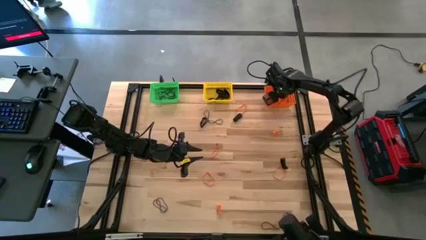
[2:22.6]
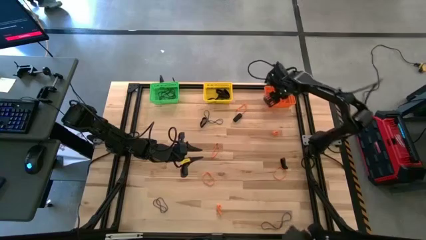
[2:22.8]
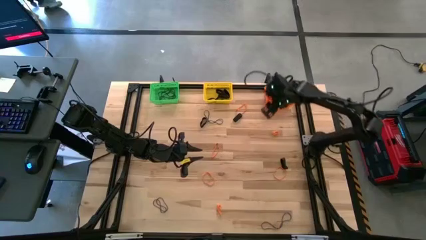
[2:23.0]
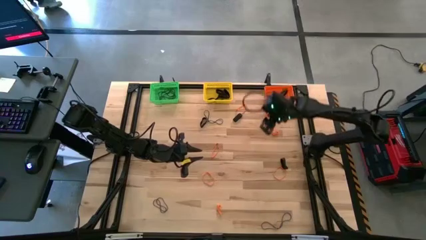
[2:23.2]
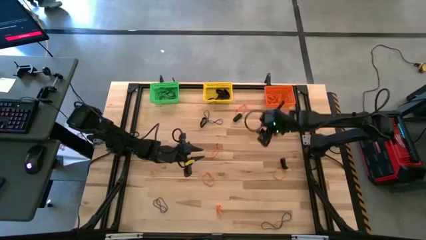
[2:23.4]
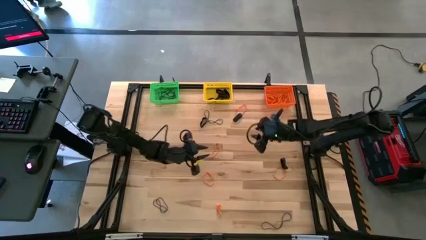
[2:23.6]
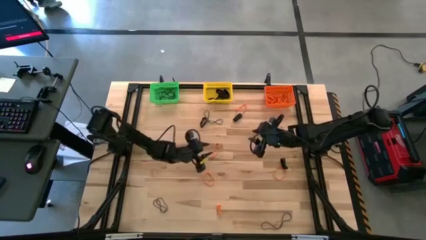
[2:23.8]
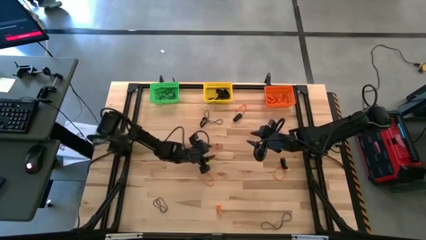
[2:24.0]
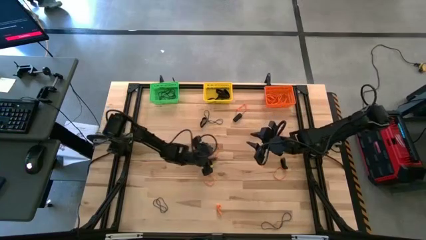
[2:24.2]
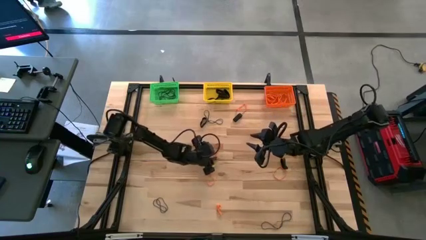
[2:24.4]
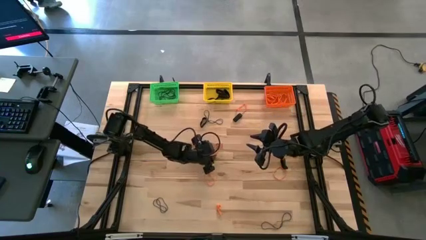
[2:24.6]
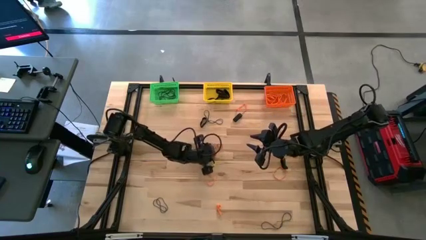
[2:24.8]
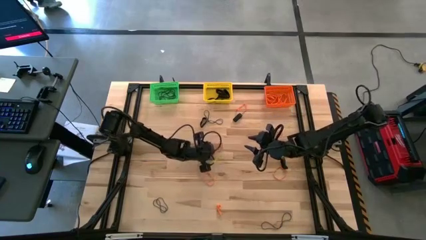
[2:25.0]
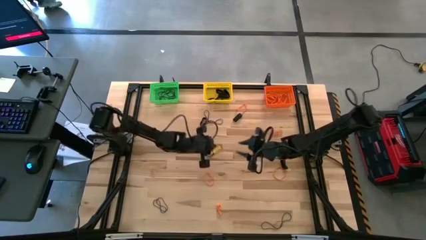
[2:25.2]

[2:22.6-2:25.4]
Task: Sort rubber bands into baskets
Put the orange rubber band into the orange bin

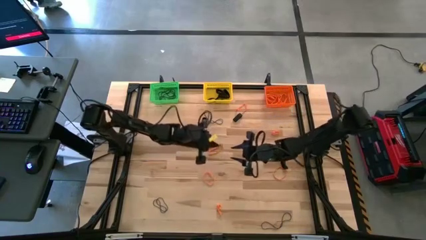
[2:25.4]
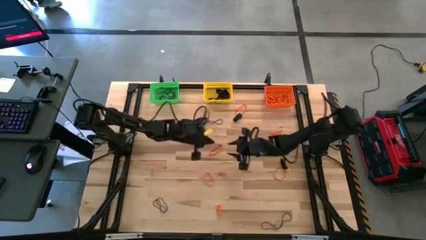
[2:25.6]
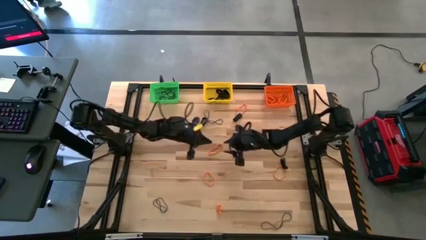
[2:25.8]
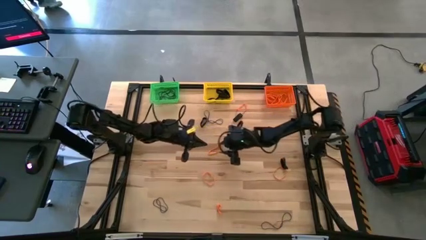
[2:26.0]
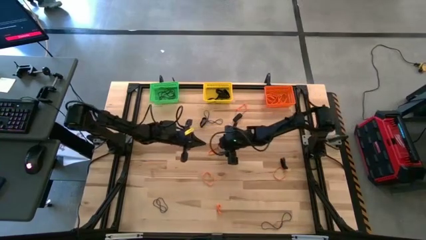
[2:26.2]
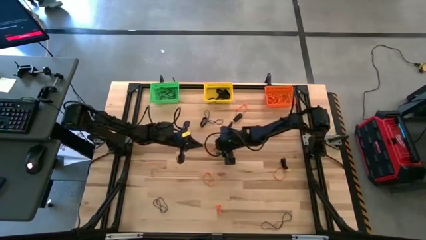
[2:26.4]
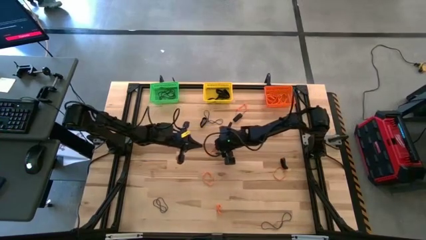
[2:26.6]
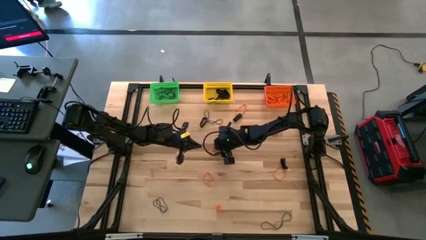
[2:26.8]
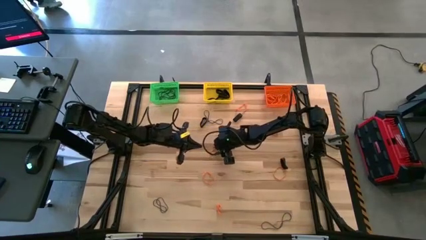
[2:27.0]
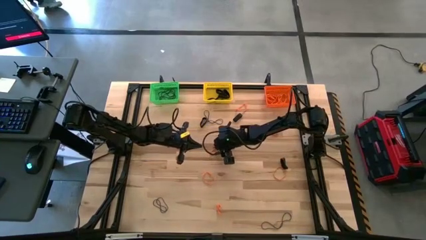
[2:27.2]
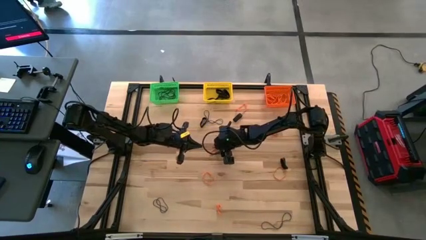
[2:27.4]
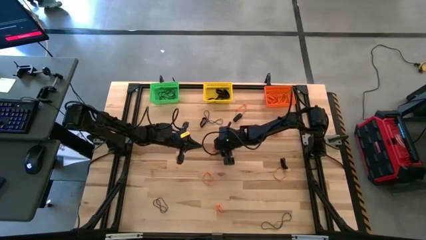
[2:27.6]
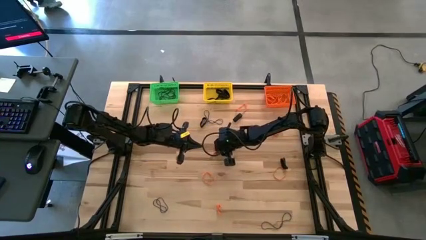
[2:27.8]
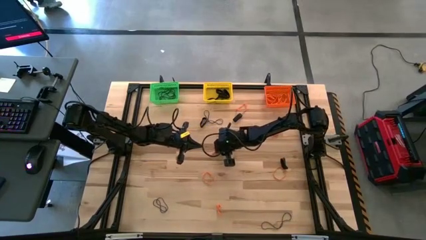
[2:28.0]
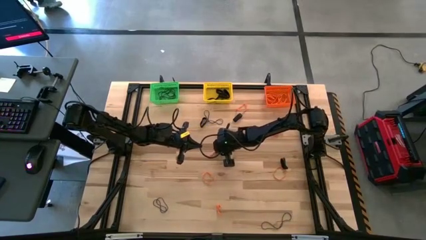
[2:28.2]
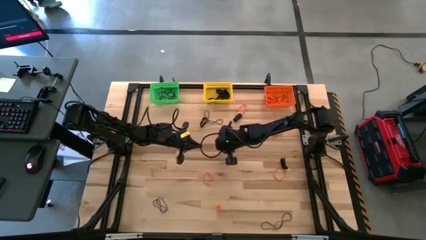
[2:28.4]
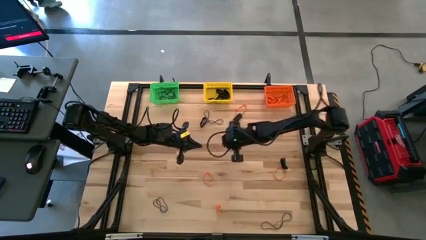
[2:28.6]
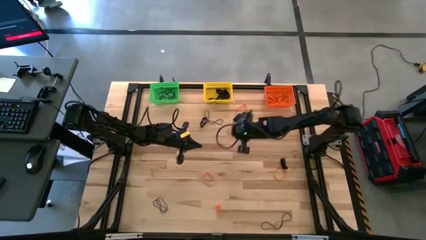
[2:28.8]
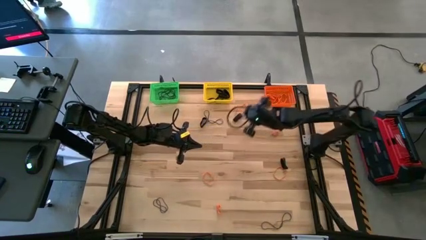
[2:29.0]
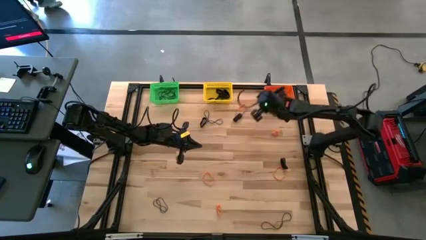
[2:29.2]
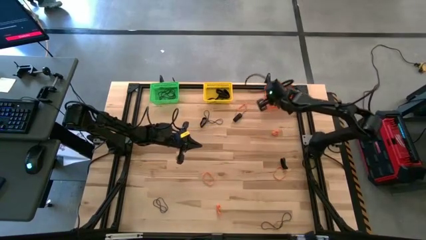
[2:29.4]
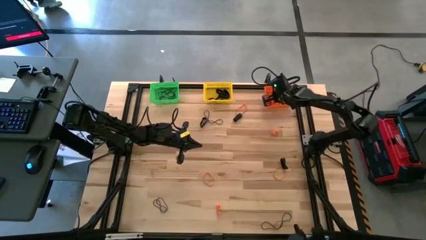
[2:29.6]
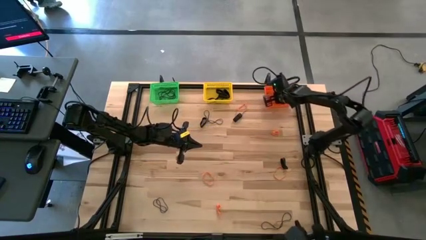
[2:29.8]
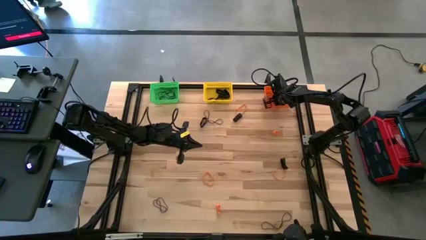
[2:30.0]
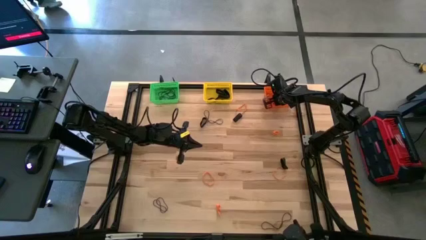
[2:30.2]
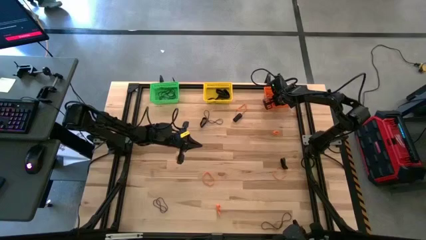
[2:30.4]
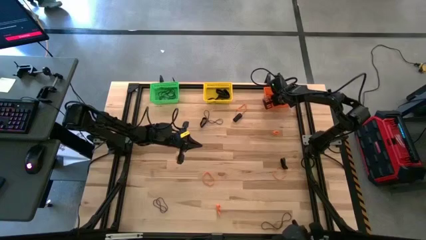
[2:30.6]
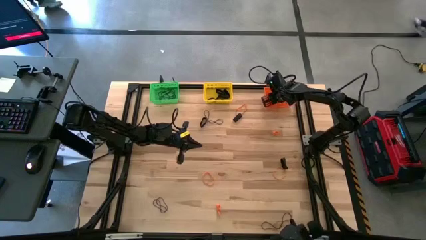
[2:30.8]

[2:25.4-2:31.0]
Put the orange rubber band into the orange bin

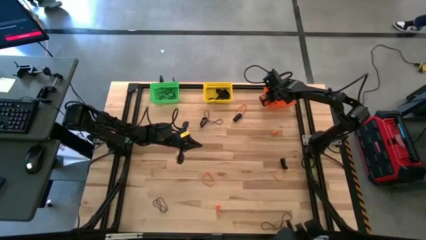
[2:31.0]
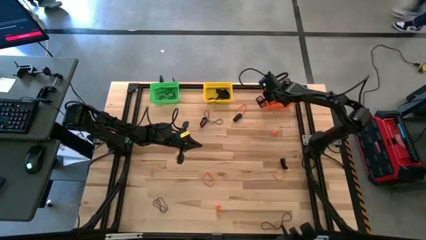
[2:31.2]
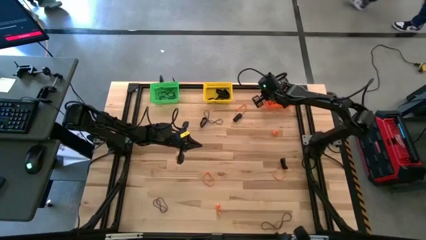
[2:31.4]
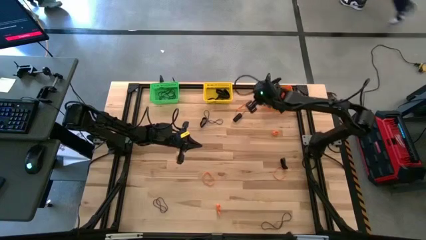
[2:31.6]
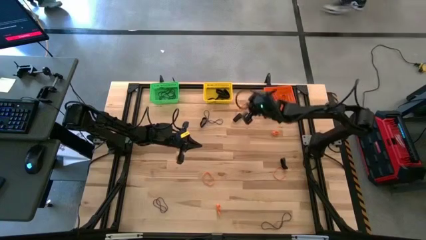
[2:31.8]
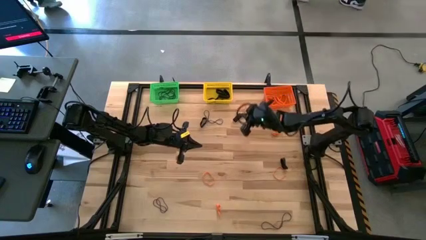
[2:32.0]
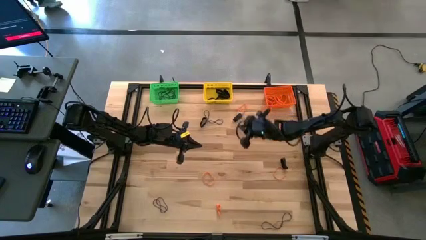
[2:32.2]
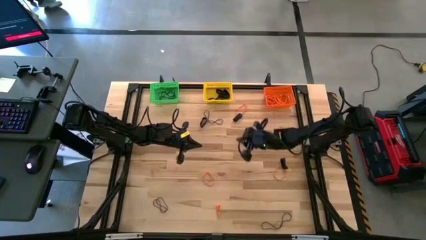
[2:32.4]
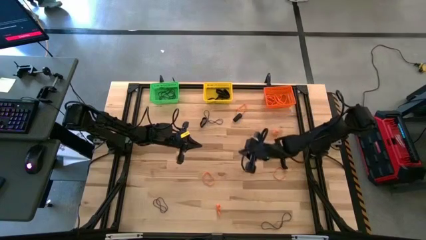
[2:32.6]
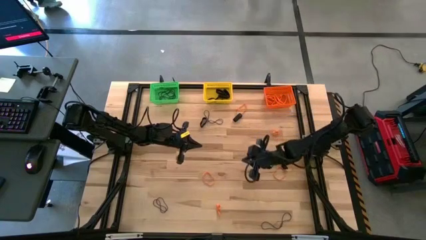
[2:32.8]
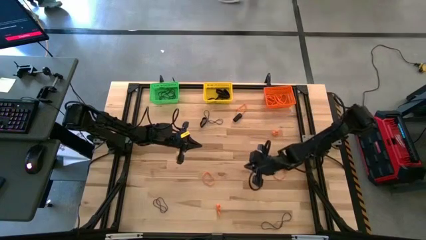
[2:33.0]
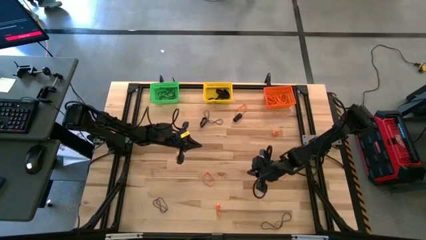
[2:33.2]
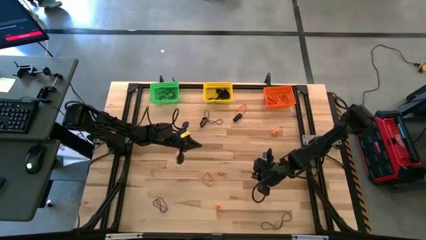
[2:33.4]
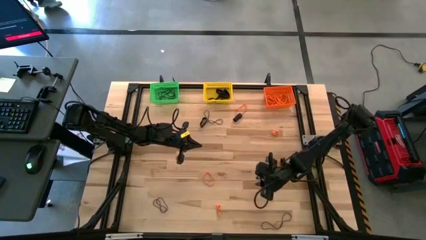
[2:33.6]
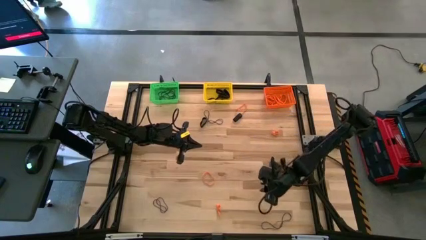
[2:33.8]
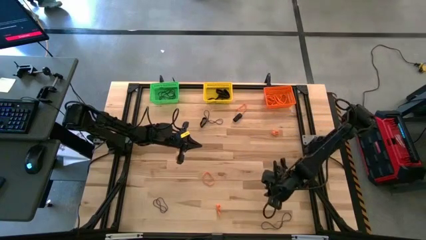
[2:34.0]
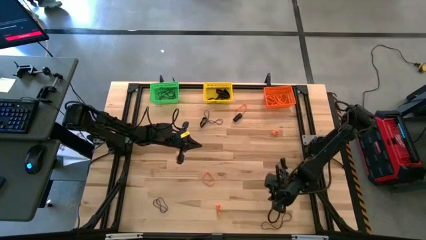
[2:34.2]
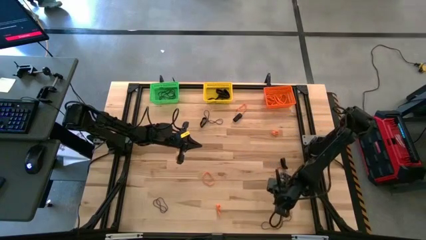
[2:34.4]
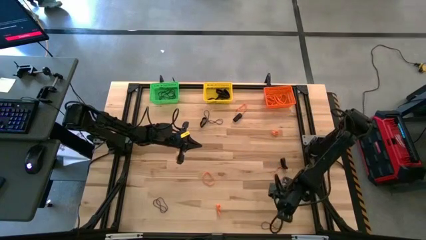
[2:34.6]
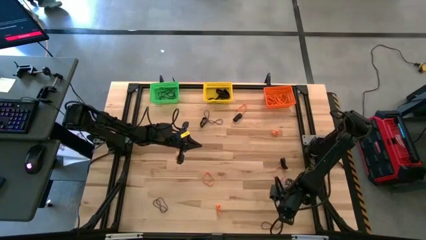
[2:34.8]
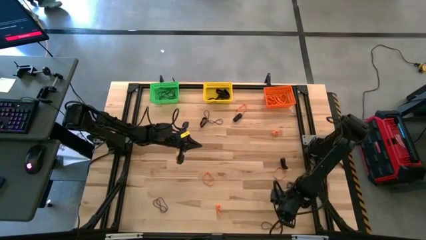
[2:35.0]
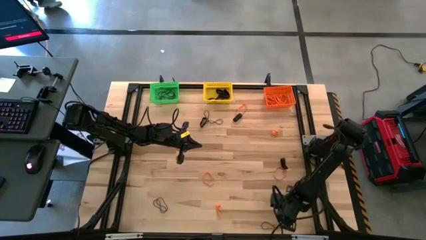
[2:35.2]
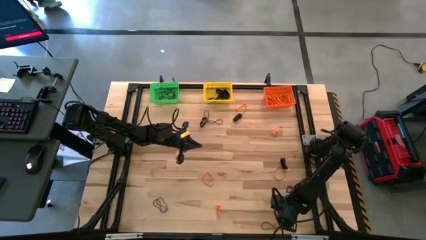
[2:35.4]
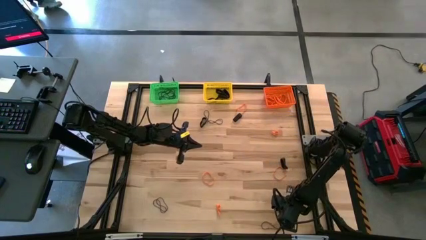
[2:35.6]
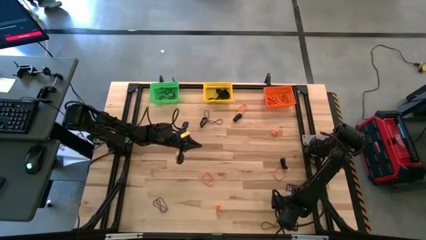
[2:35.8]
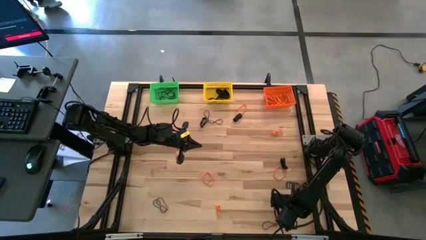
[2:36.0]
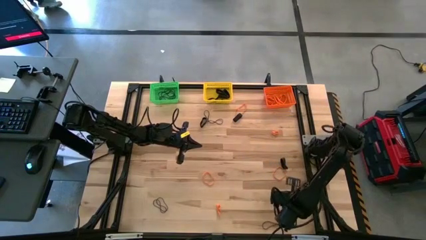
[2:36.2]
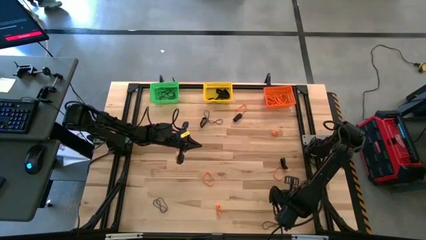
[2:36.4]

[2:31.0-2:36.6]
Put the purple rubber band into the green bin
